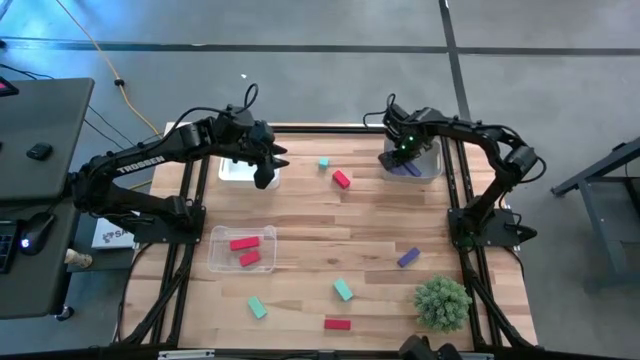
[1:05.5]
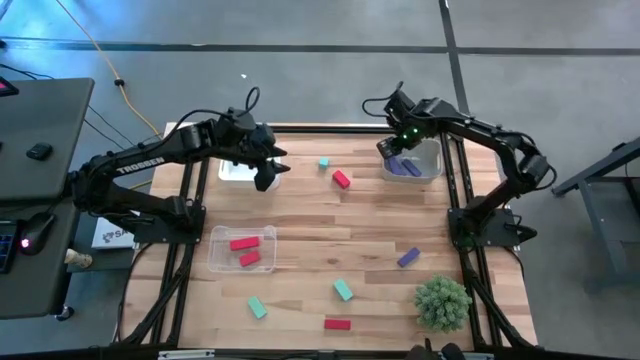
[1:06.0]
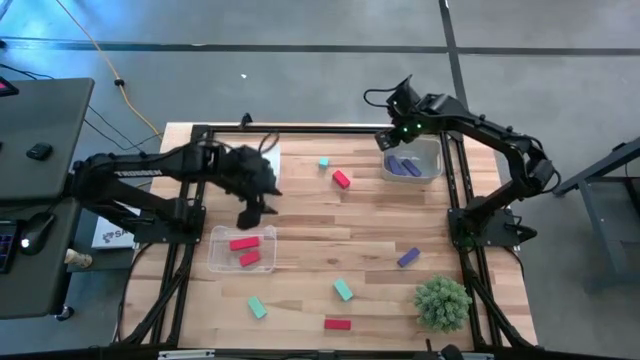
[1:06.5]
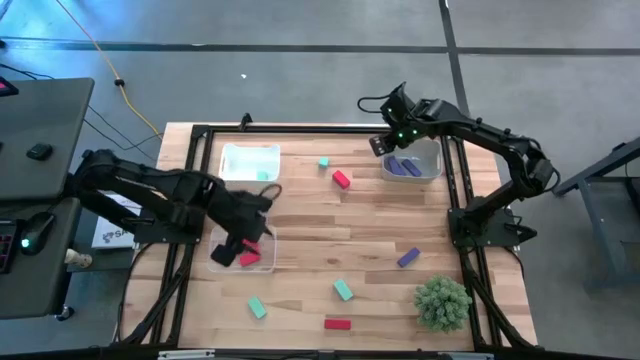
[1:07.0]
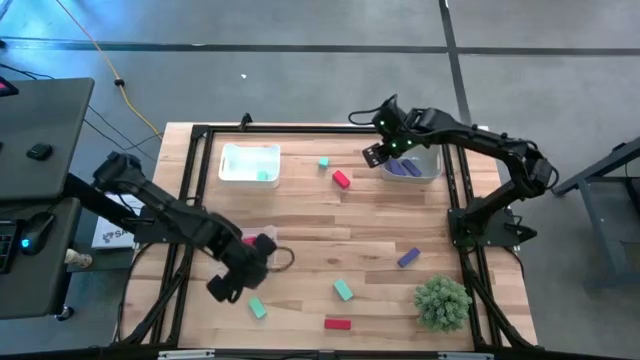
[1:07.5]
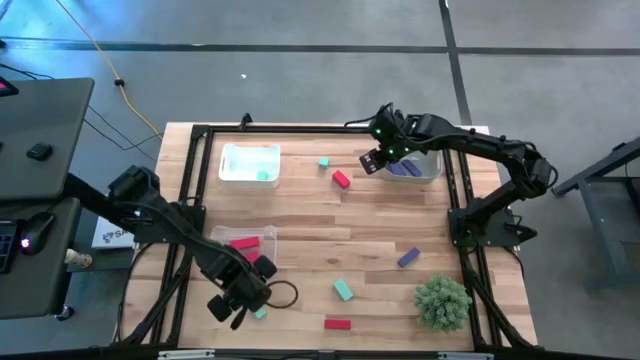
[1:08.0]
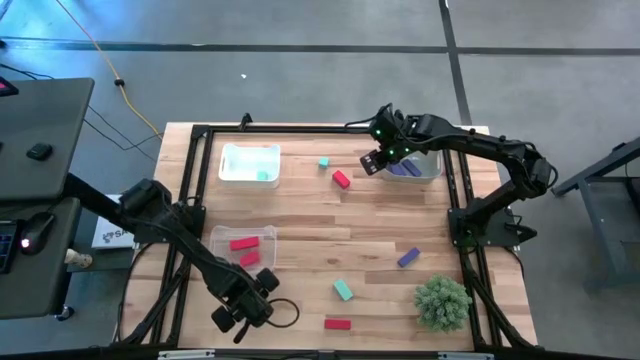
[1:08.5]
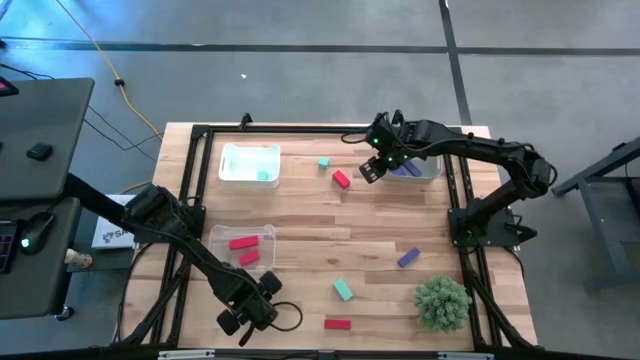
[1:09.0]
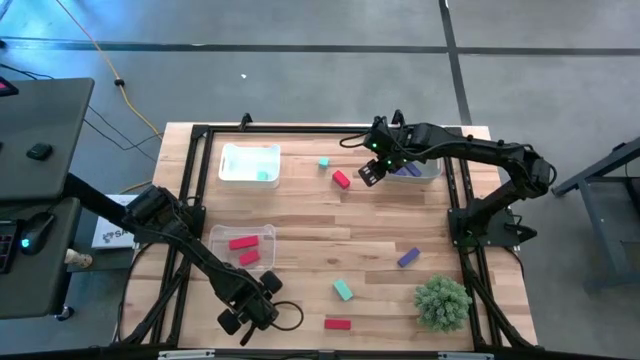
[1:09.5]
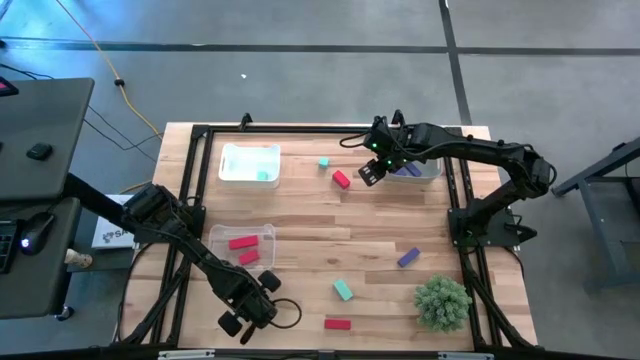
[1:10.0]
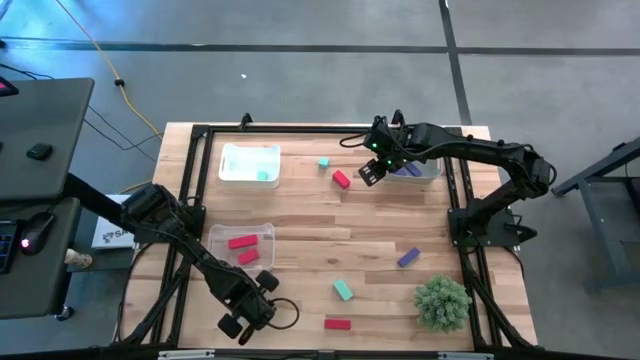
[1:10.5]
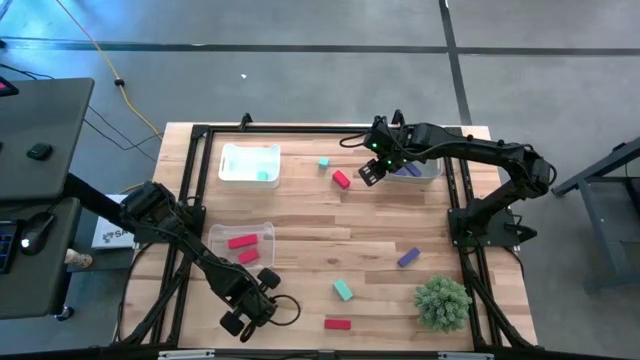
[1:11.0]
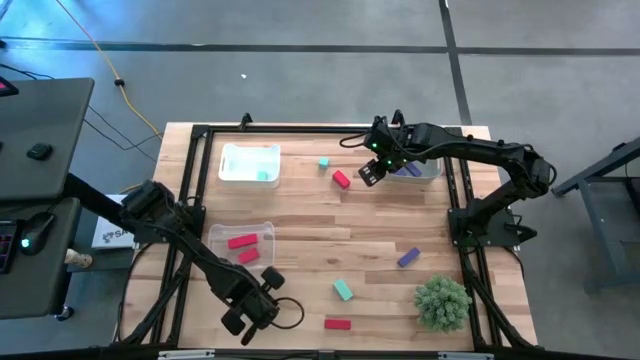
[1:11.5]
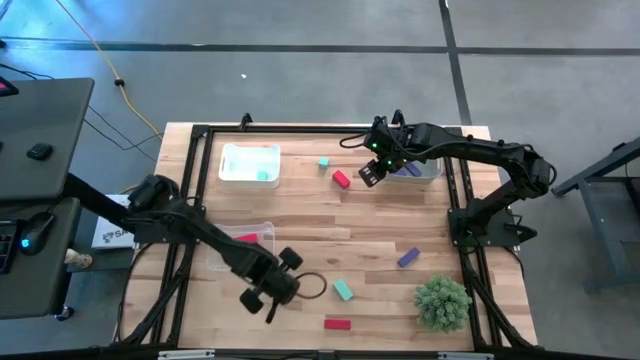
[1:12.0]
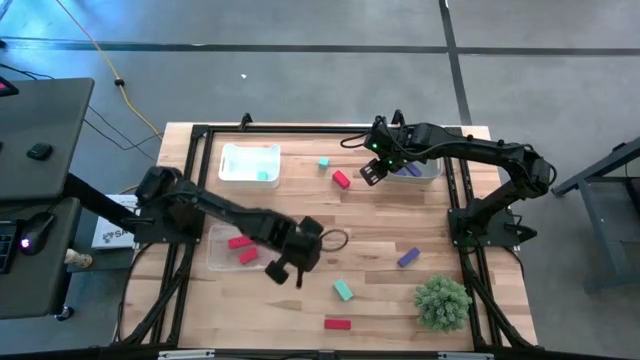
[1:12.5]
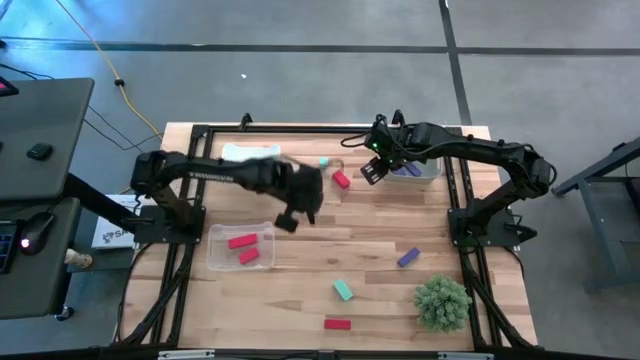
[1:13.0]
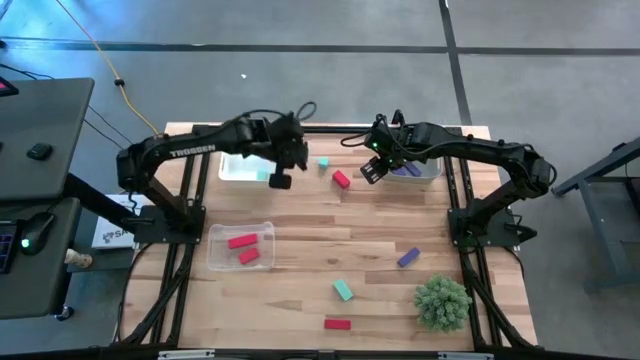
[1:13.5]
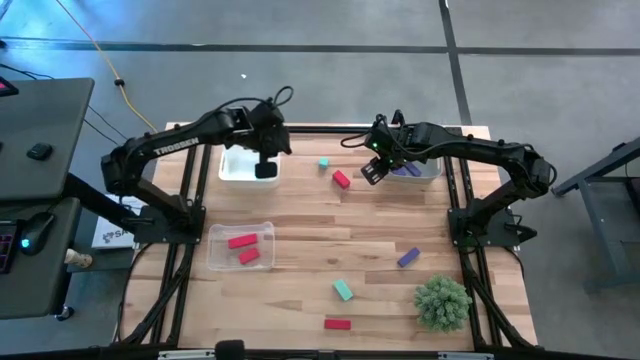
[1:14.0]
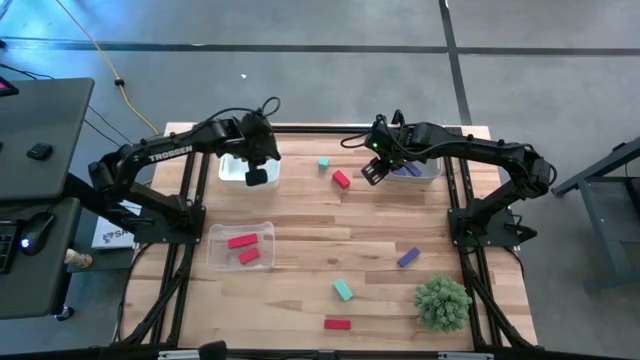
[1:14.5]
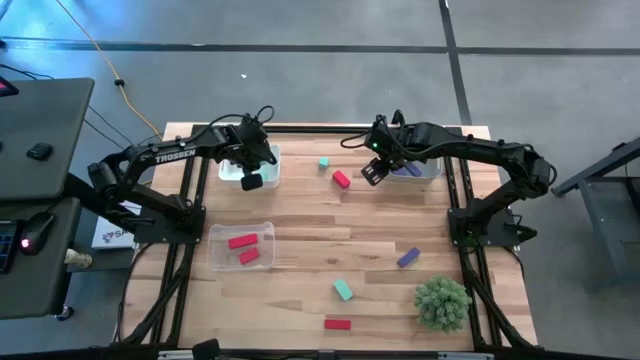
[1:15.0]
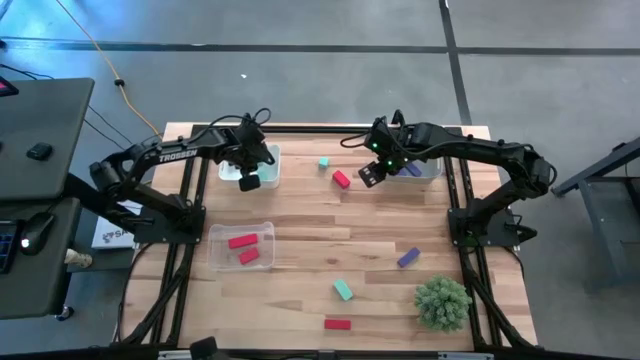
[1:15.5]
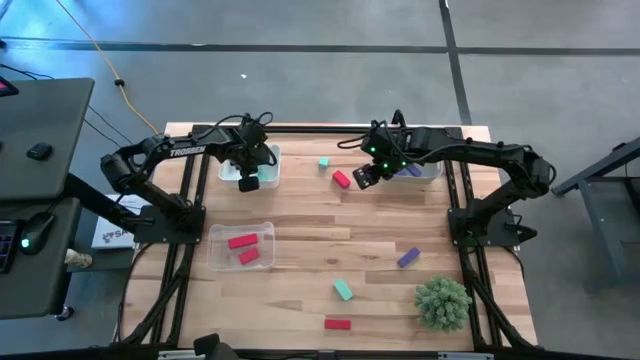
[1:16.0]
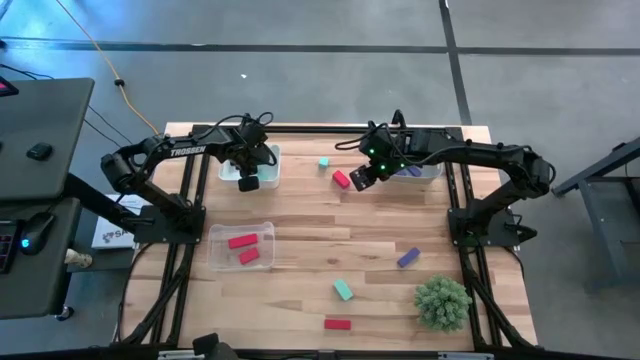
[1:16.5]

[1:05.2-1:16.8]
Task: Sort & place blocks by color
Put the bottom left light blue block into the white bin

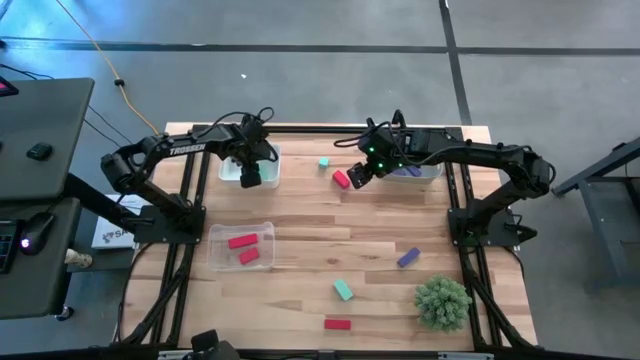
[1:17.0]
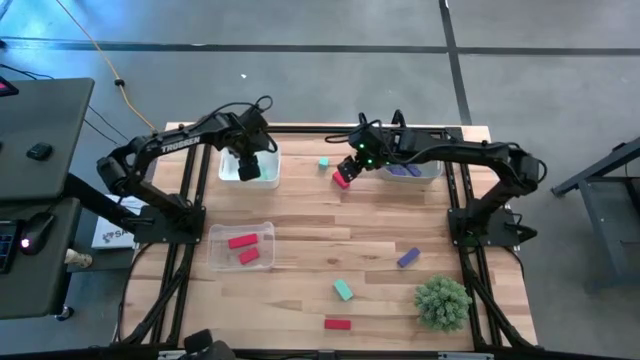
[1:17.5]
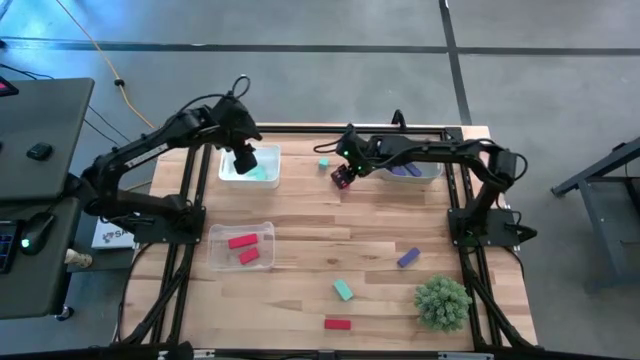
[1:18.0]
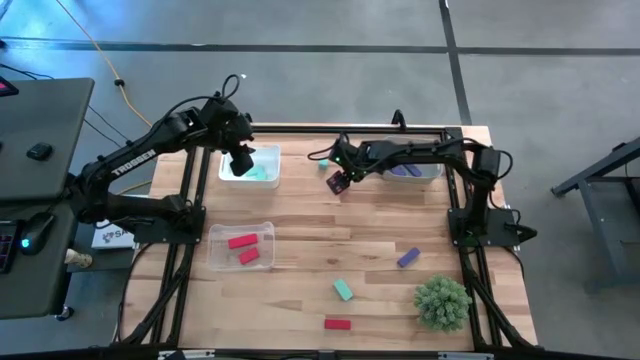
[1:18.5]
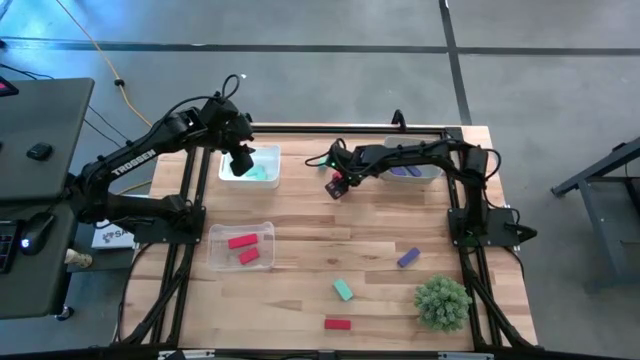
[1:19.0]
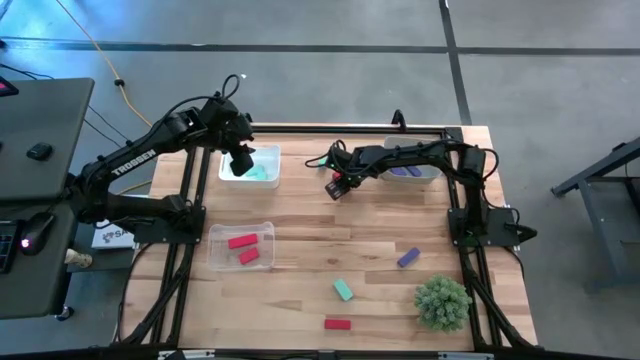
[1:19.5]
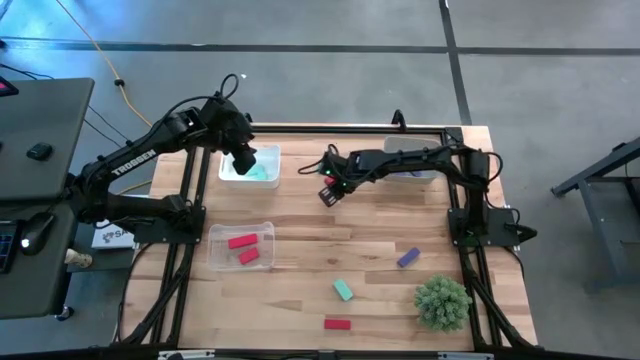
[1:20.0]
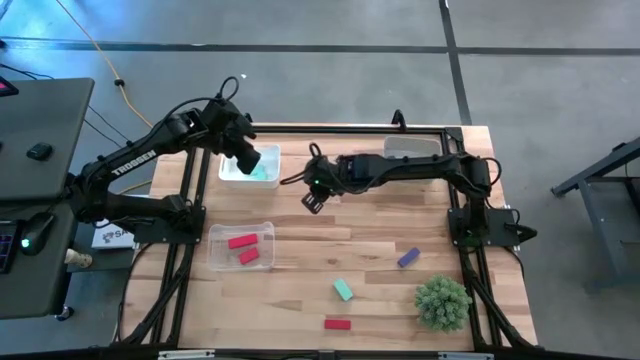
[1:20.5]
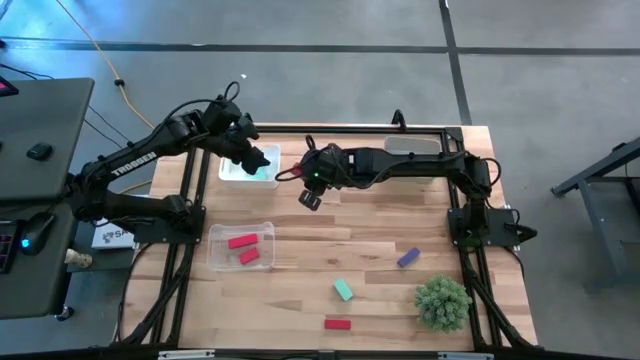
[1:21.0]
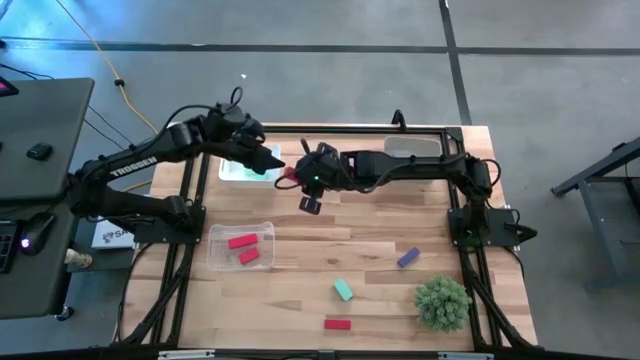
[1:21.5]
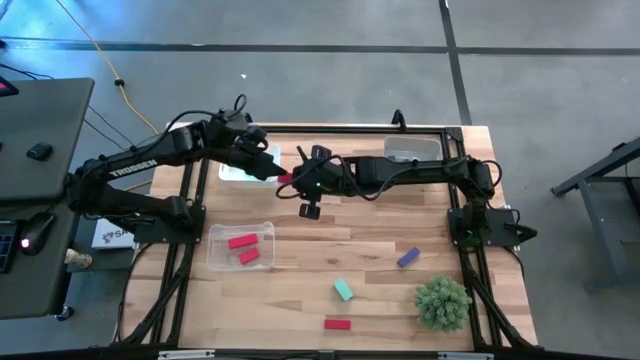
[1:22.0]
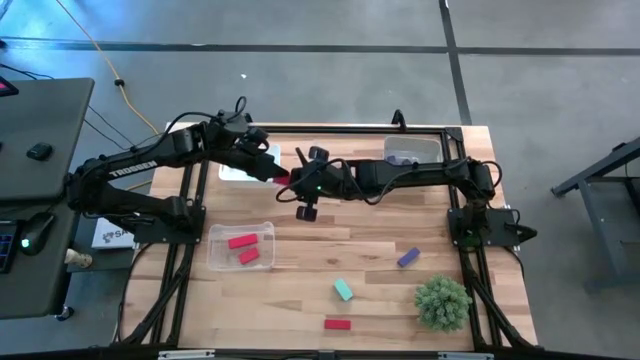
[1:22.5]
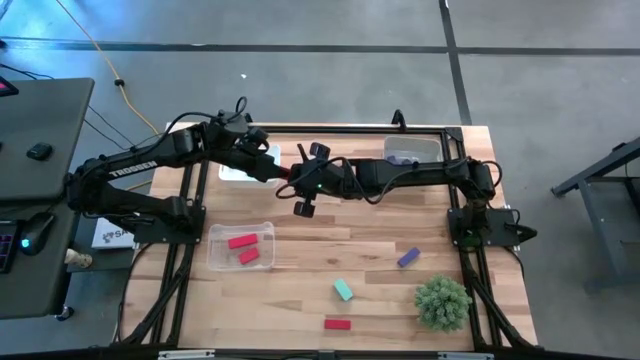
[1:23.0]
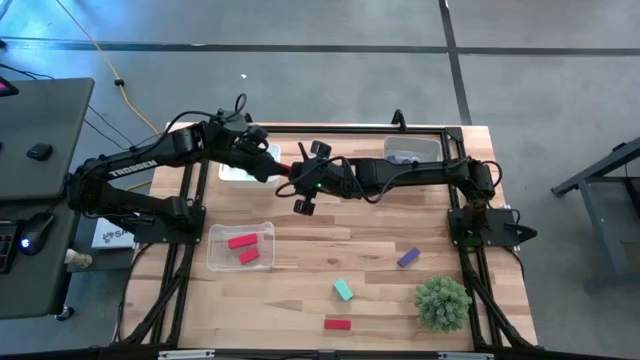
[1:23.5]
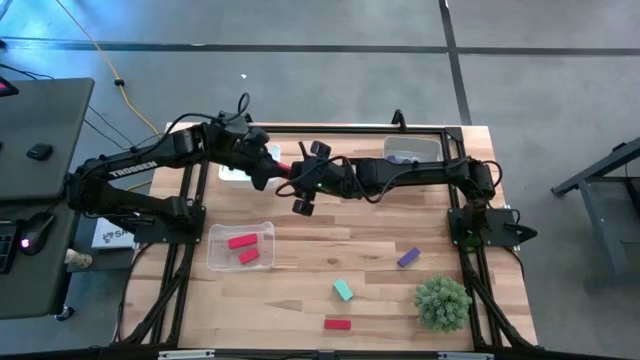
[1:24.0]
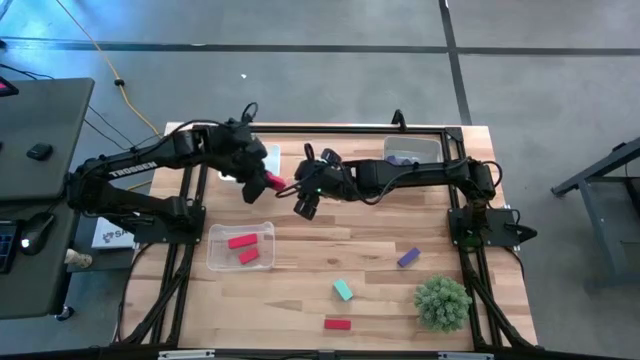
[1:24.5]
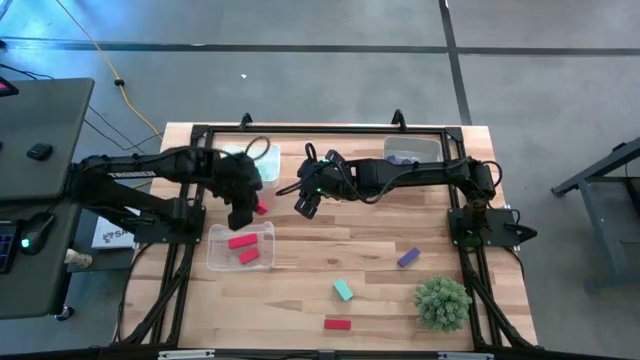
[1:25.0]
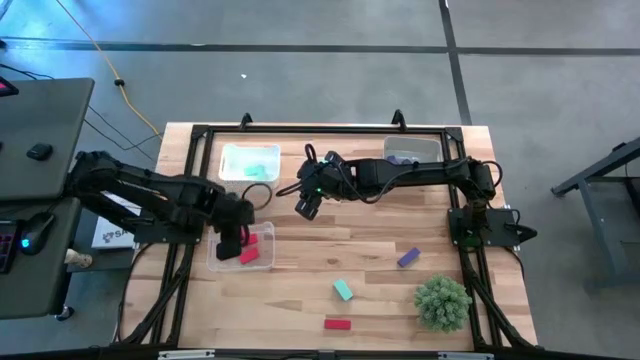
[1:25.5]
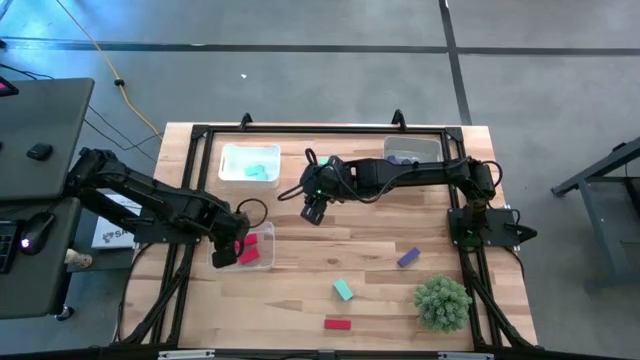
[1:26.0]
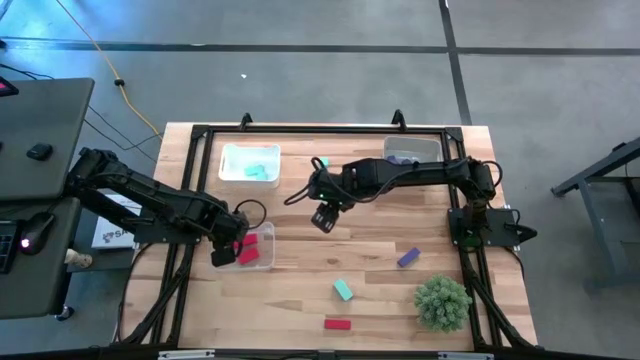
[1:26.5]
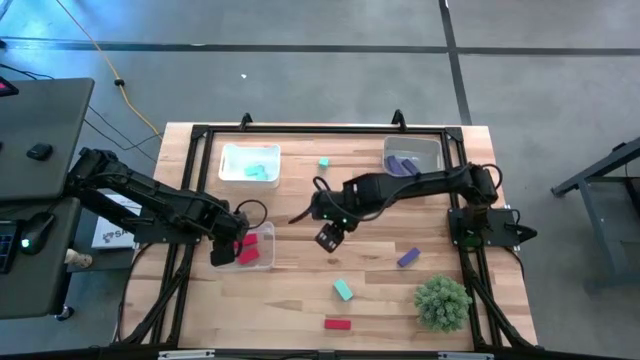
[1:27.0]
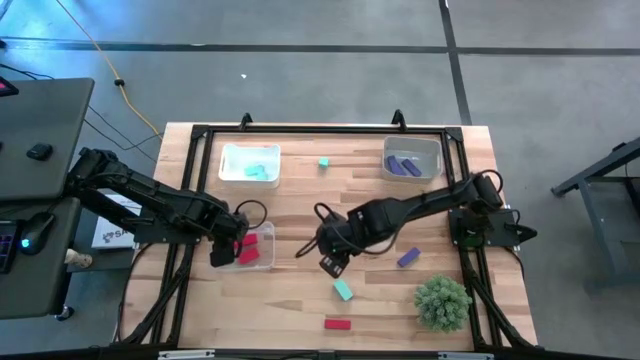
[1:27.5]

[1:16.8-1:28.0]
Put the top red block into the transparent bin
